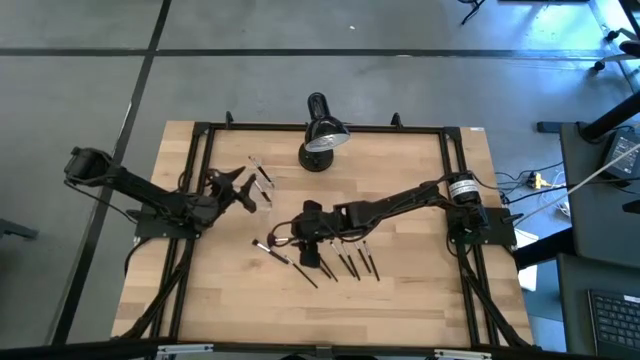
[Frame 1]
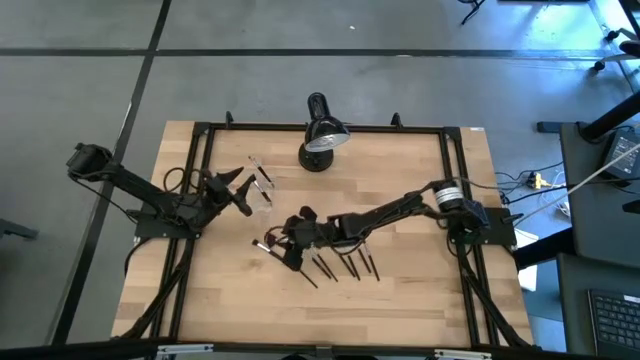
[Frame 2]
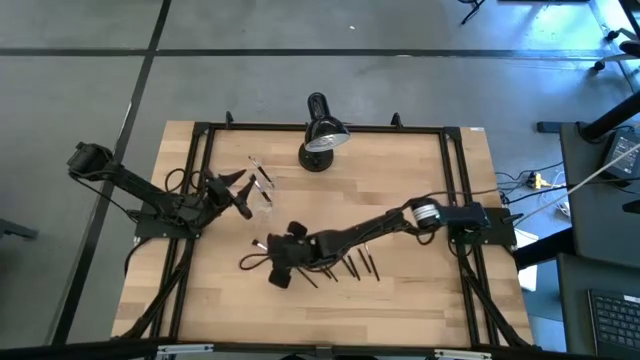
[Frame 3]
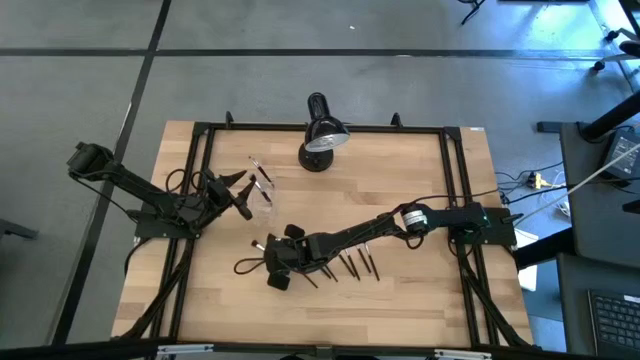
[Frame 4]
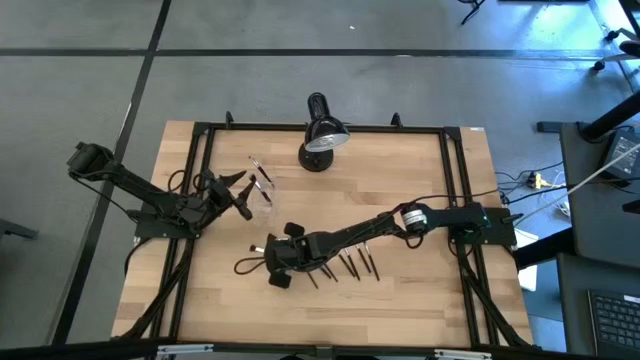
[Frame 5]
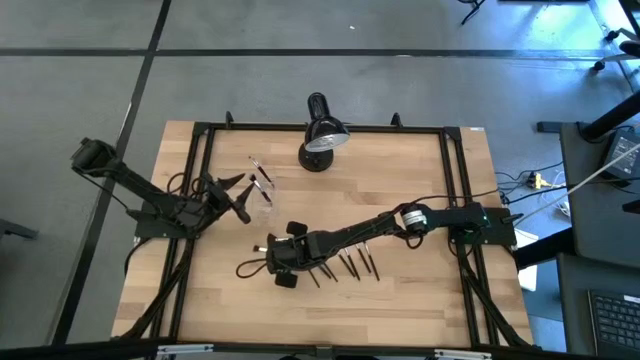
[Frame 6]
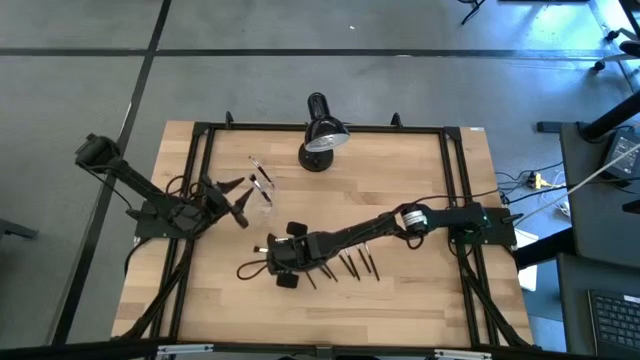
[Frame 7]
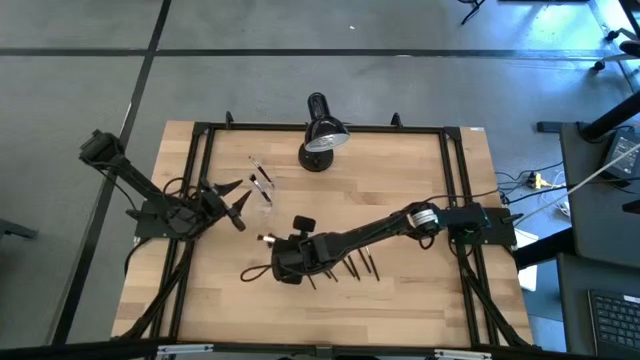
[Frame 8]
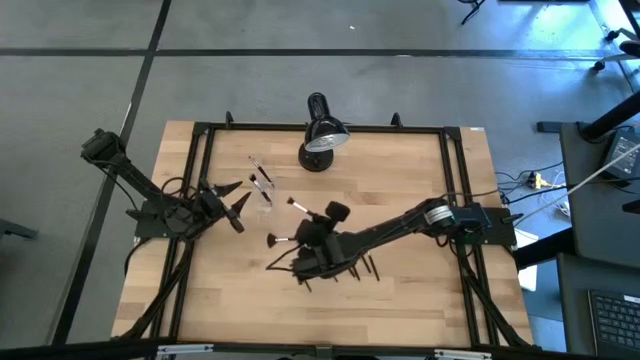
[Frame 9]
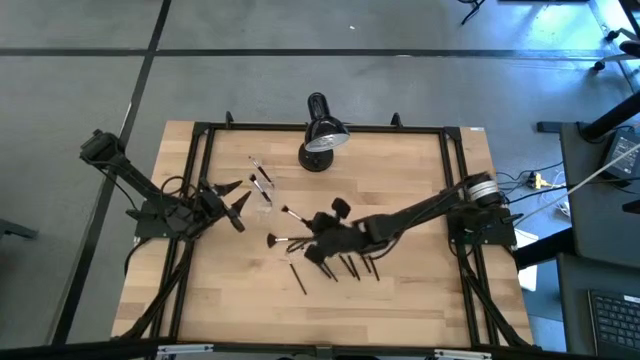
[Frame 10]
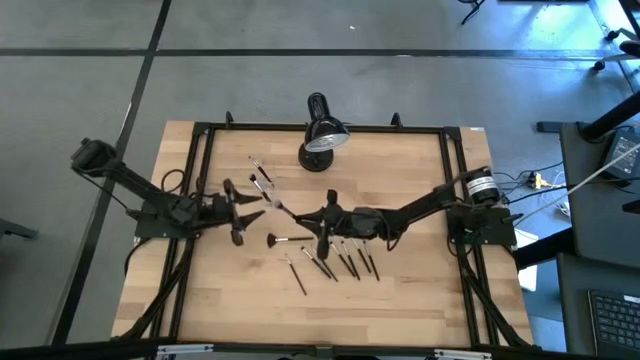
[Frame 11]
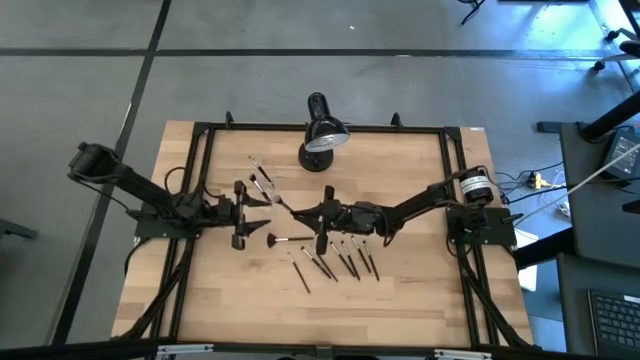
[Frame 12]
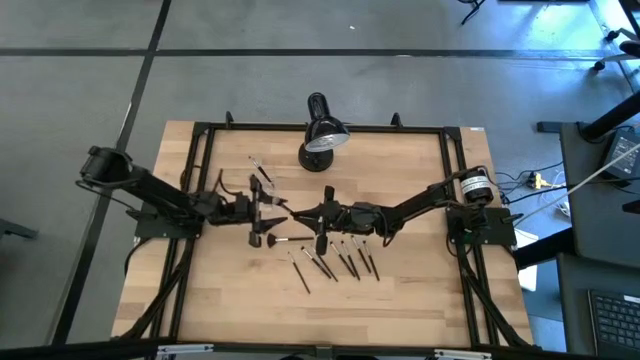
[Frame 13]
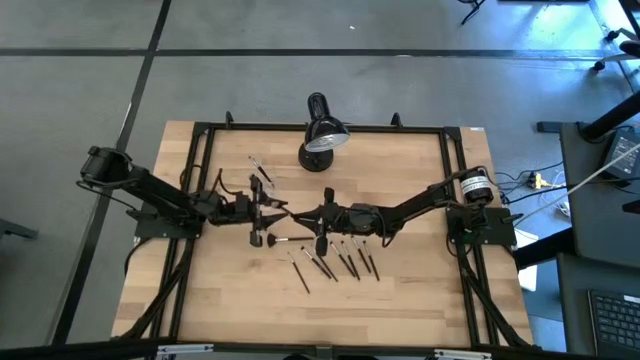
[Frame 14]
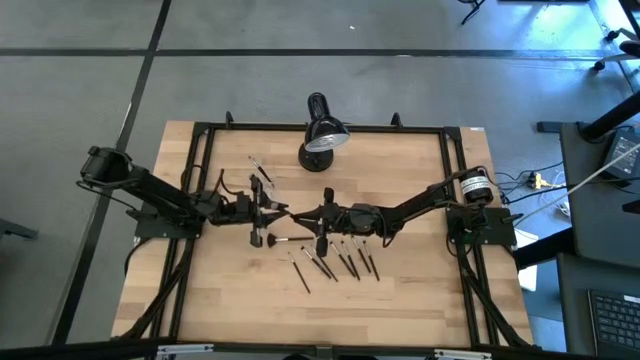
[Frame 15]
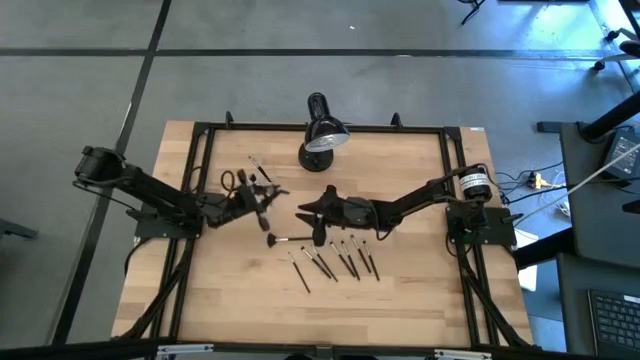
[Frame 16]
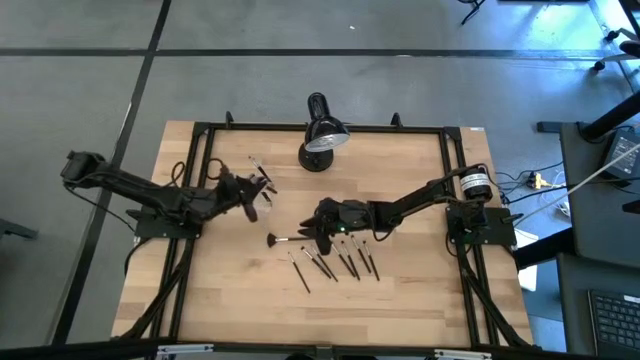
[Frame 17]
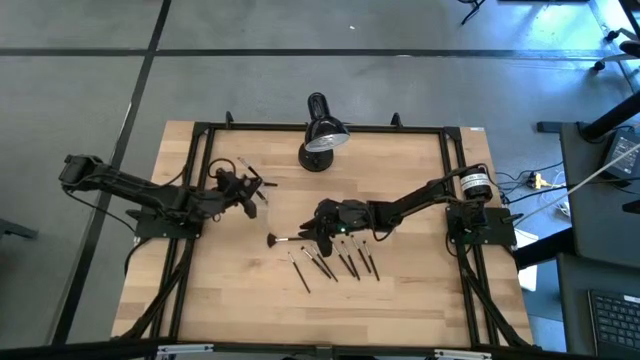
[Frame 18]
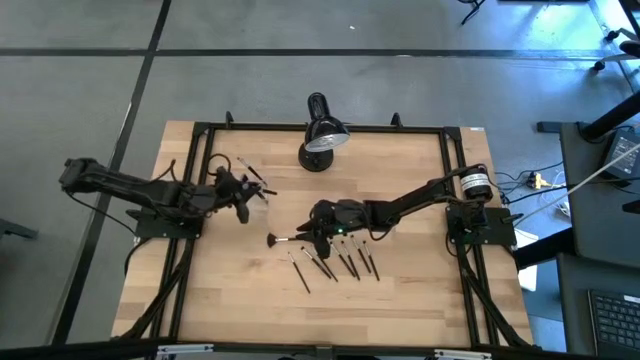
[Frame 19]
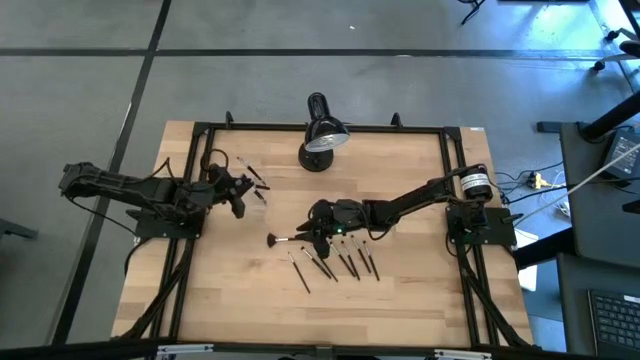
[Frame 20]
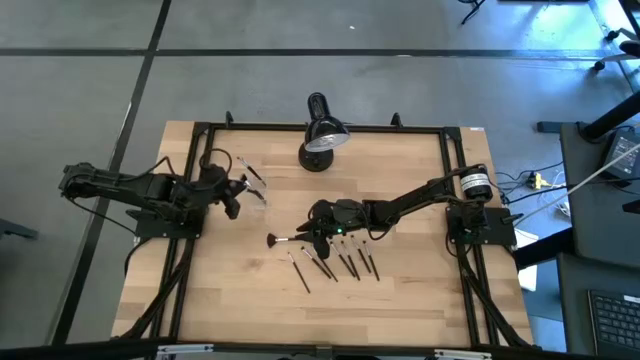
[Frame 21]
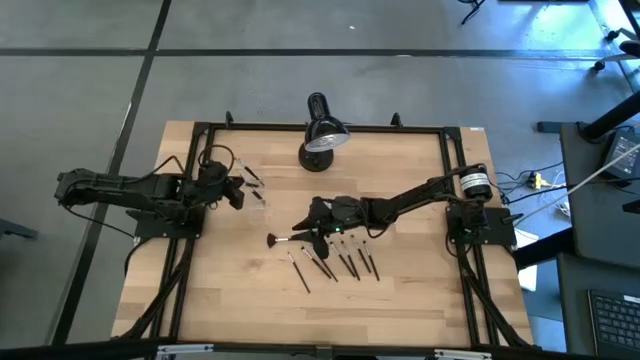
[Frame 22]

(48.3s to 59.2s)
Task: Sort items
Put the blush brush into the transparent organizer

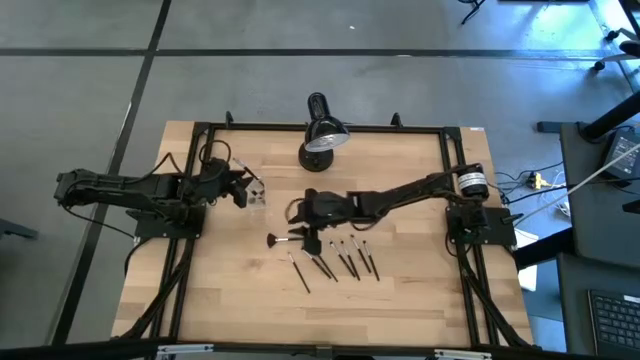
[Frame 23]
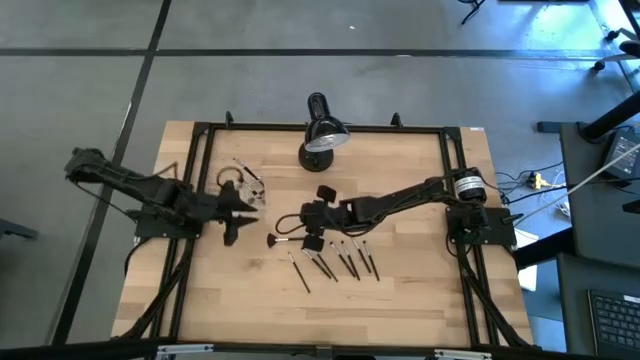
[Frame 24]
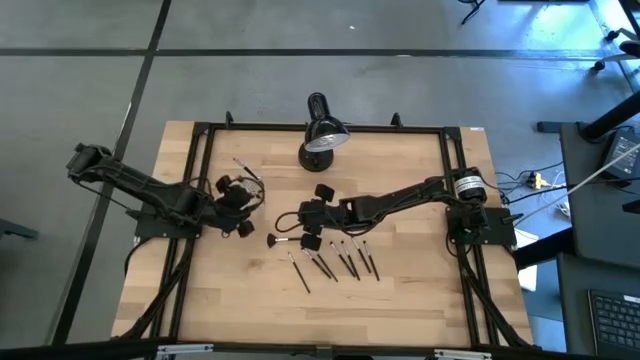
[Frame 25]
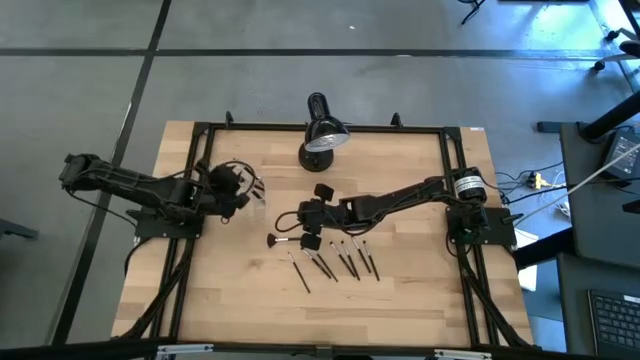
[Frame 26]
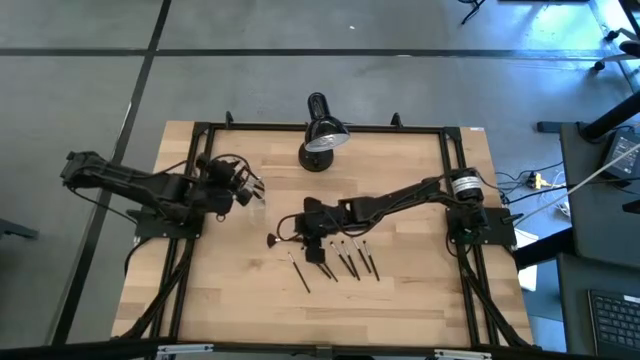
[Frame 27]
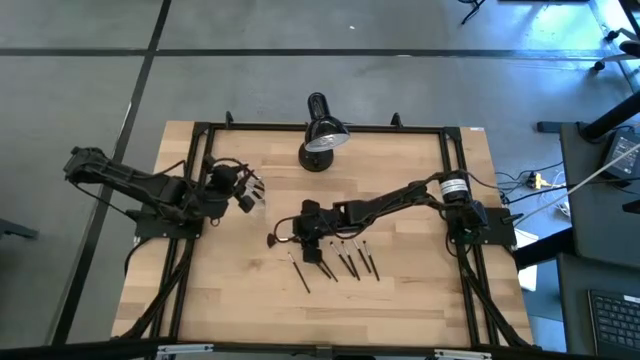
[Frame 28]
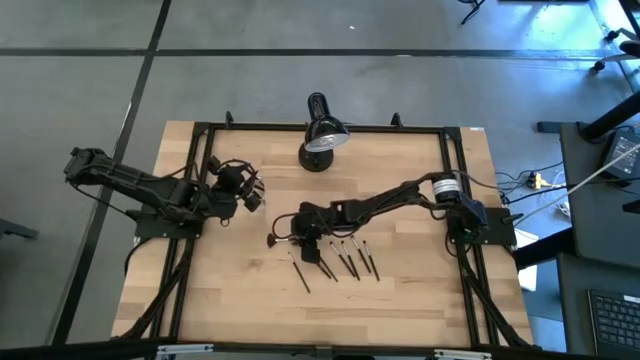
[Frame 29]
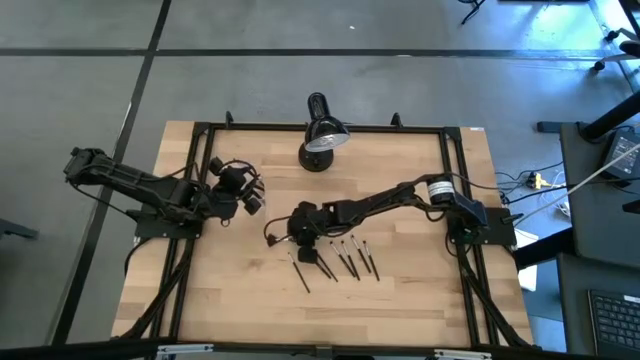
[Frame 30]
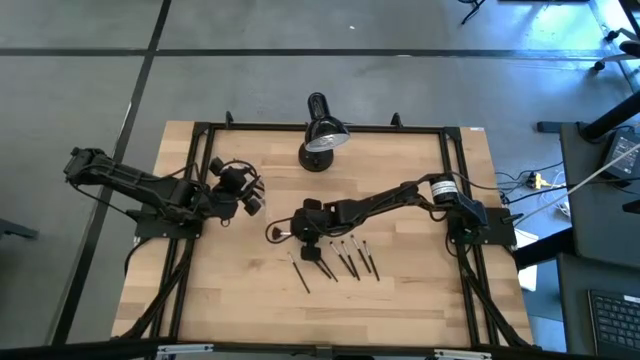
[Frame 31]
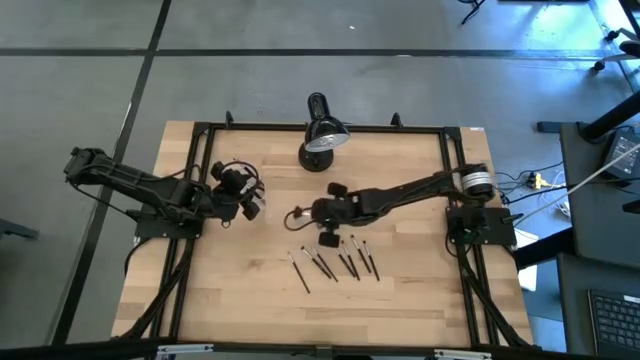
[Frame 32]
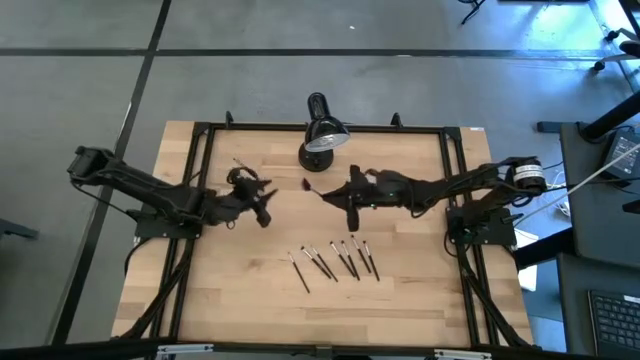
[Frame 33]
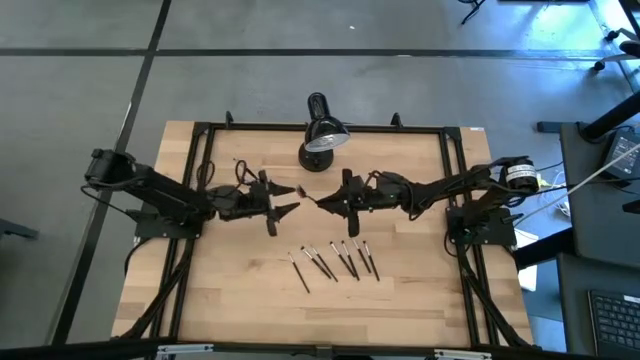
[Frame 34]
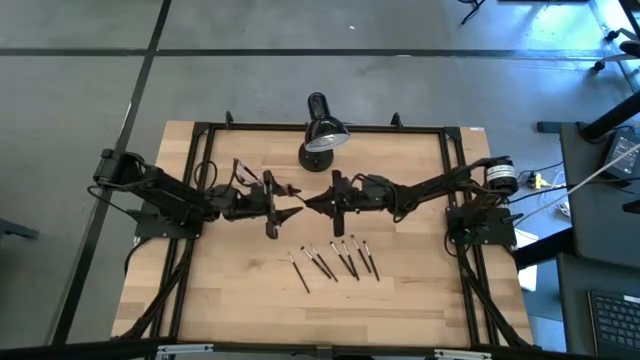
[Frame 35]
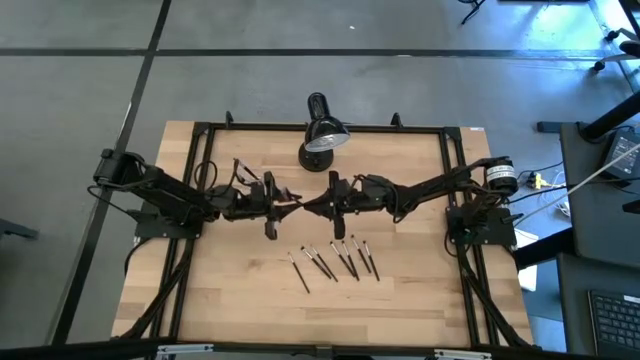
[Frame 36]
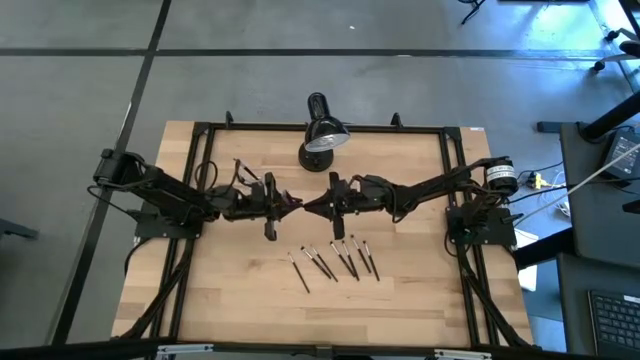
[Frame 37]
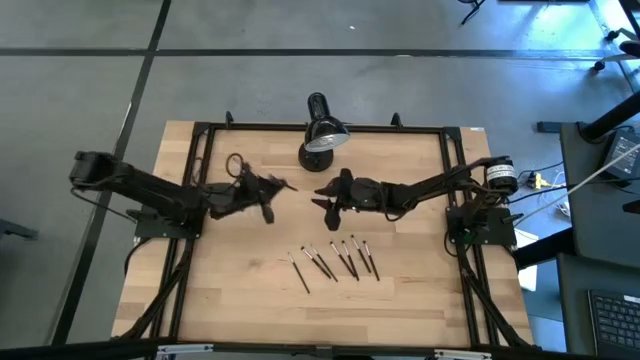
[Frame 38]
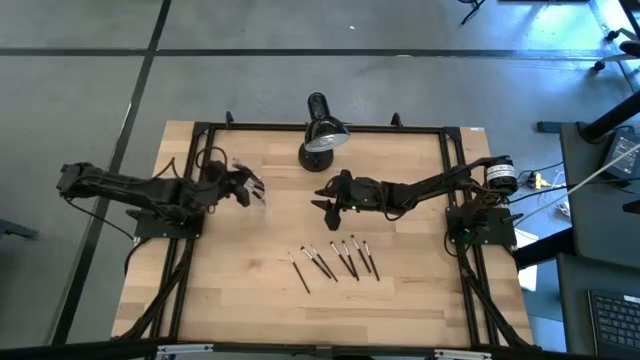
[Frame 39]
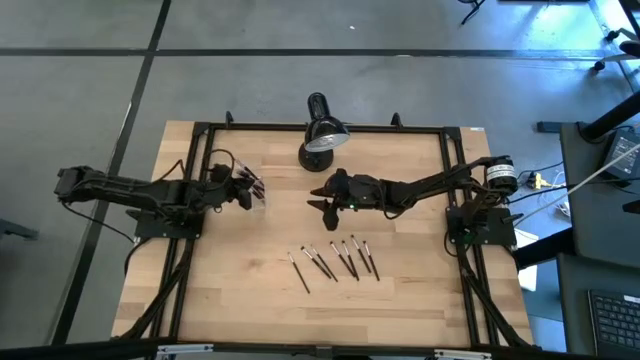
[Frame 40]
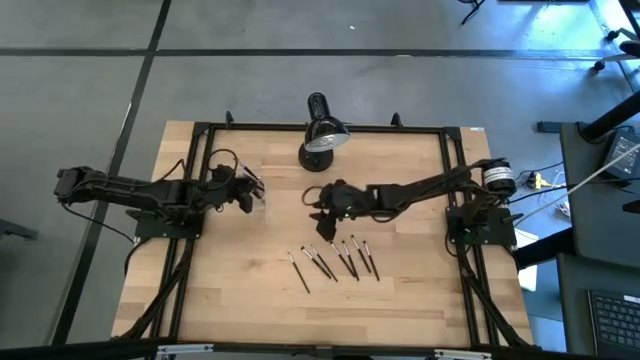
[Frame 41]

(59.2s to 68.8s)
Put the highlighter brush into the transparent organizer
